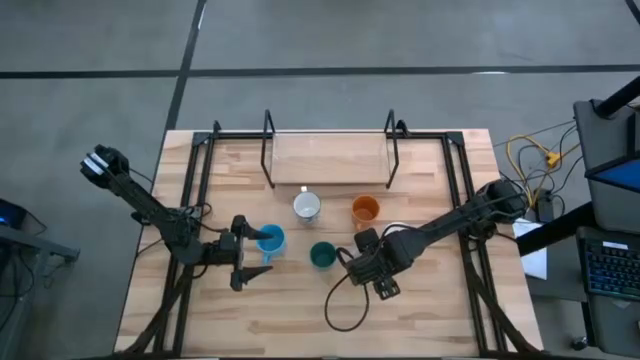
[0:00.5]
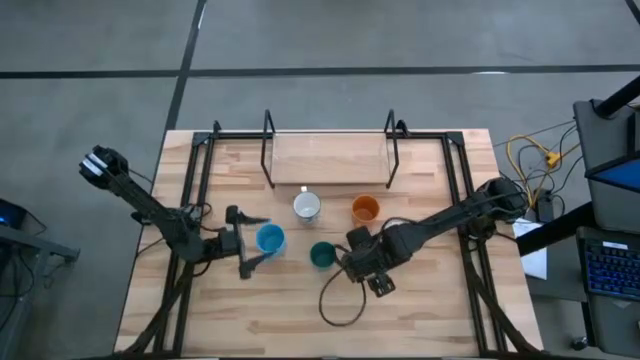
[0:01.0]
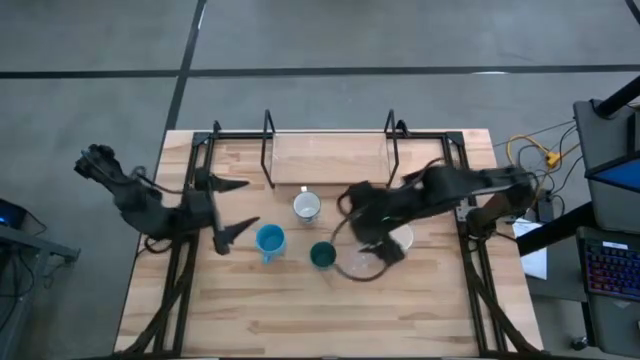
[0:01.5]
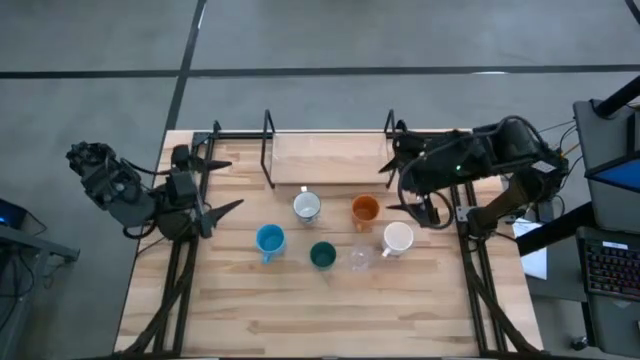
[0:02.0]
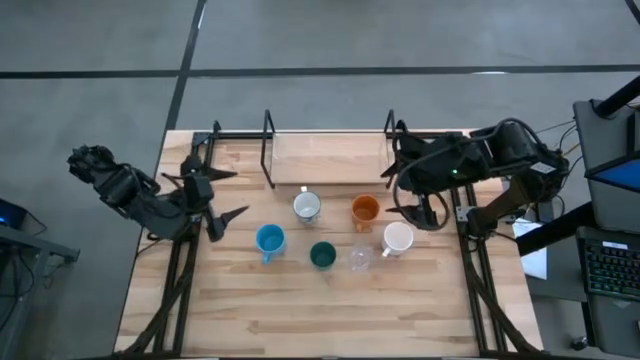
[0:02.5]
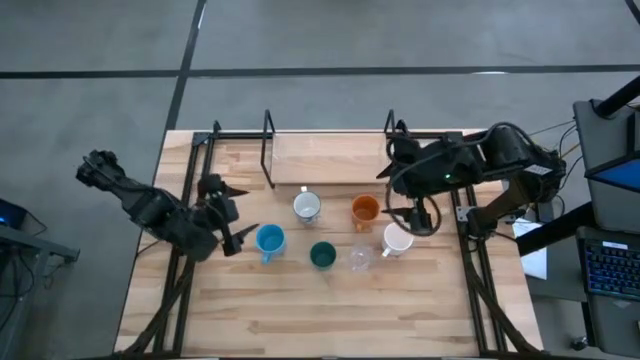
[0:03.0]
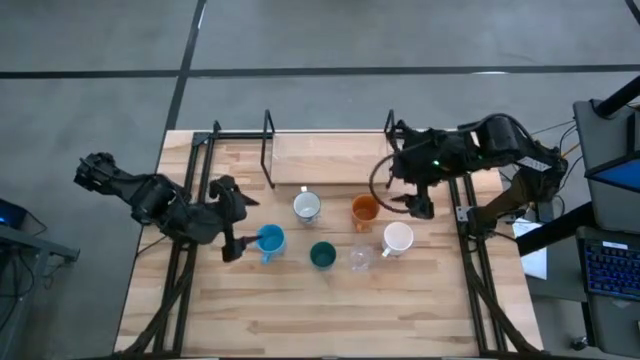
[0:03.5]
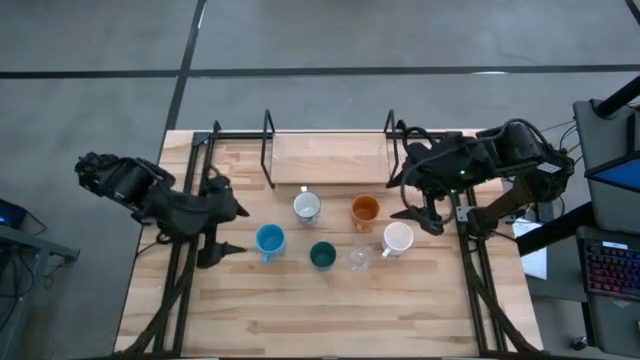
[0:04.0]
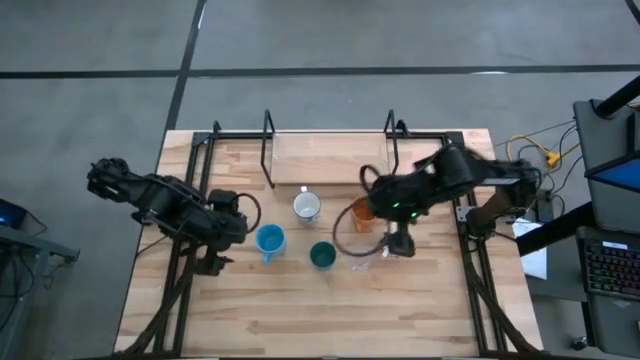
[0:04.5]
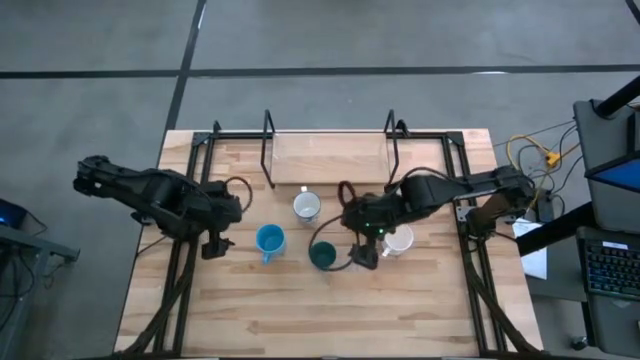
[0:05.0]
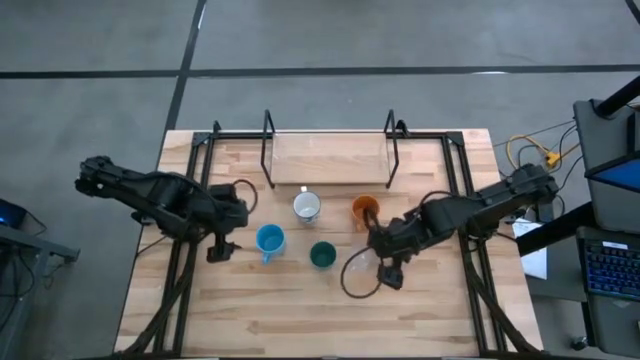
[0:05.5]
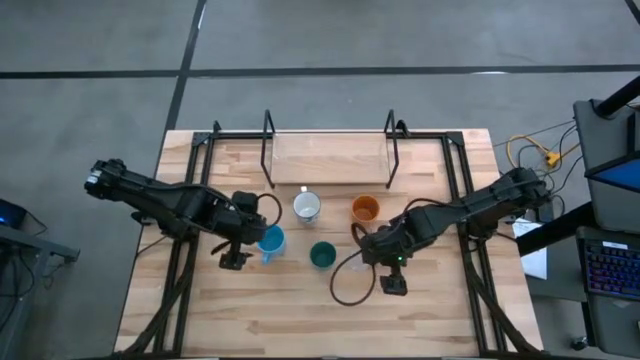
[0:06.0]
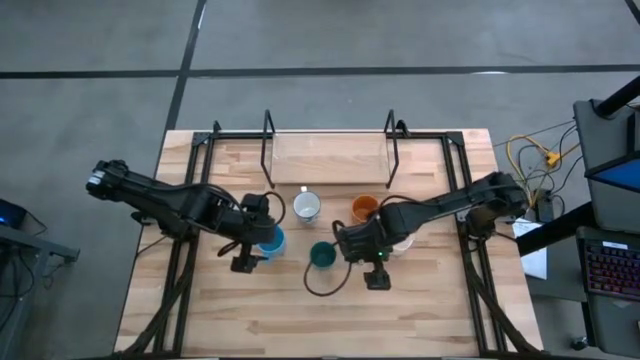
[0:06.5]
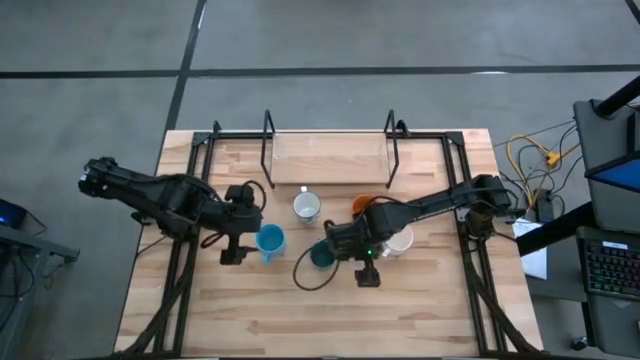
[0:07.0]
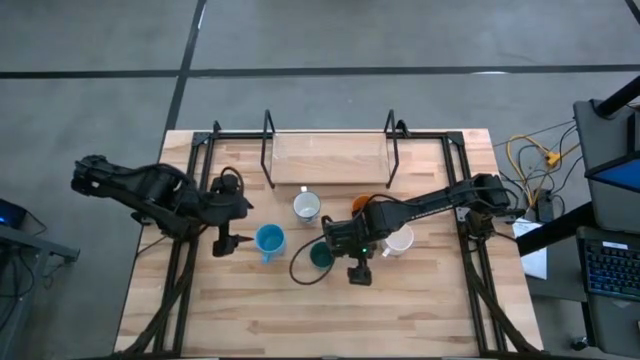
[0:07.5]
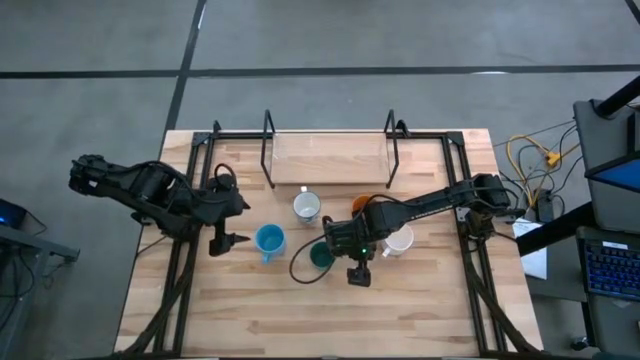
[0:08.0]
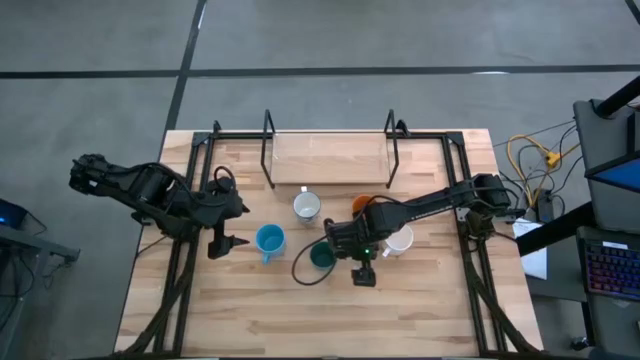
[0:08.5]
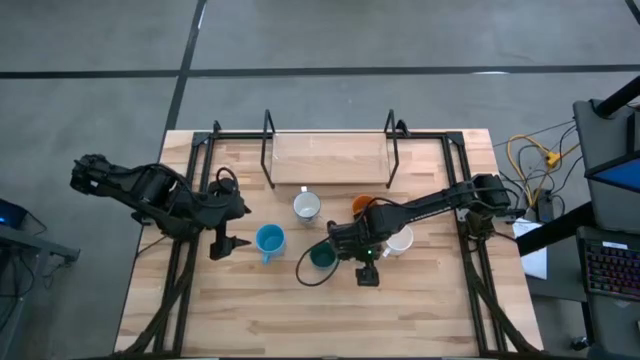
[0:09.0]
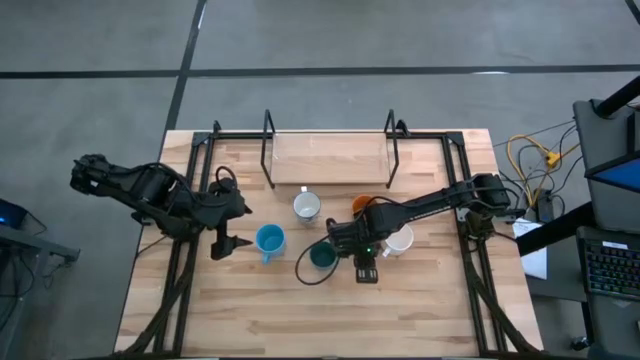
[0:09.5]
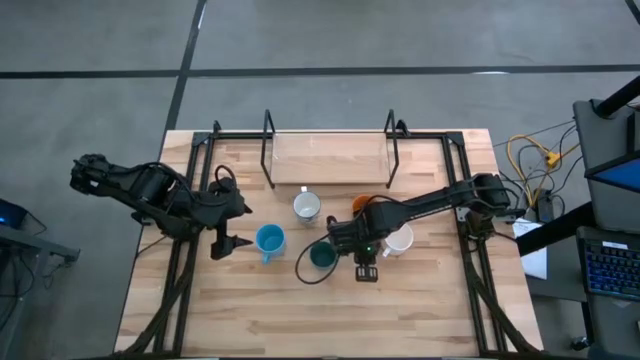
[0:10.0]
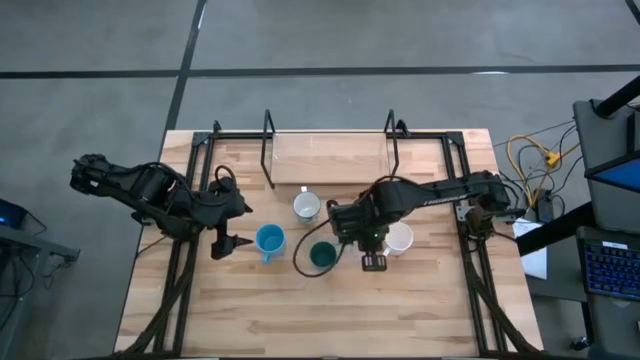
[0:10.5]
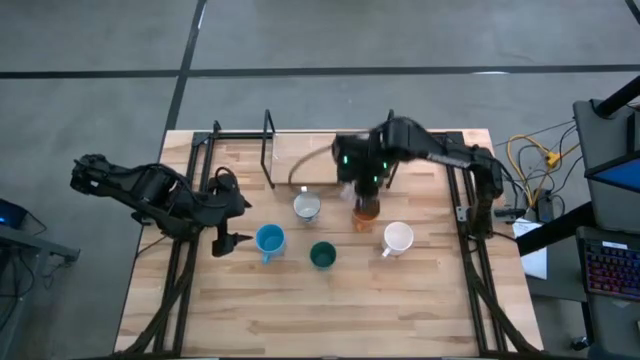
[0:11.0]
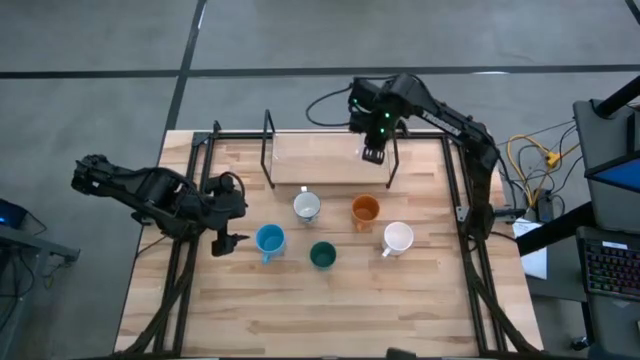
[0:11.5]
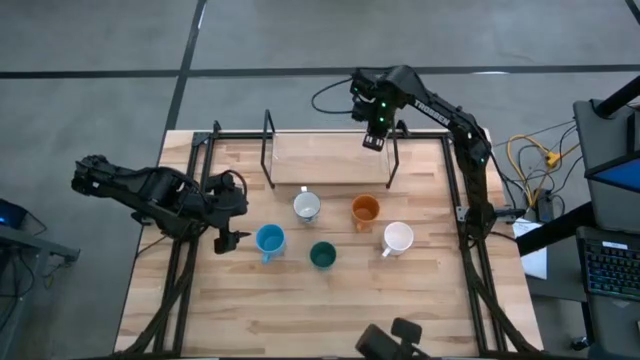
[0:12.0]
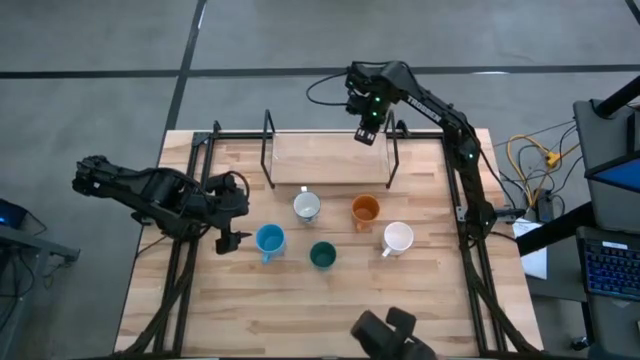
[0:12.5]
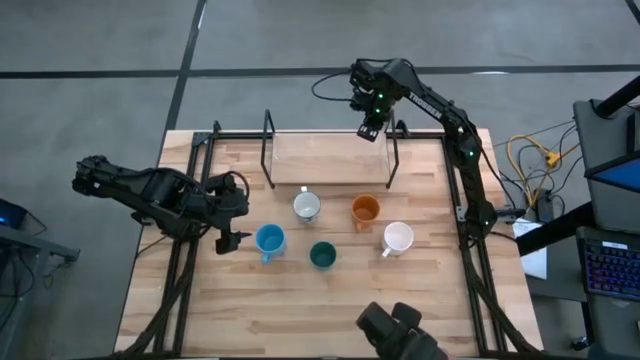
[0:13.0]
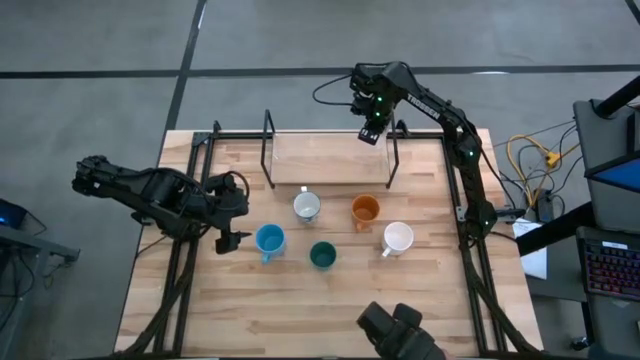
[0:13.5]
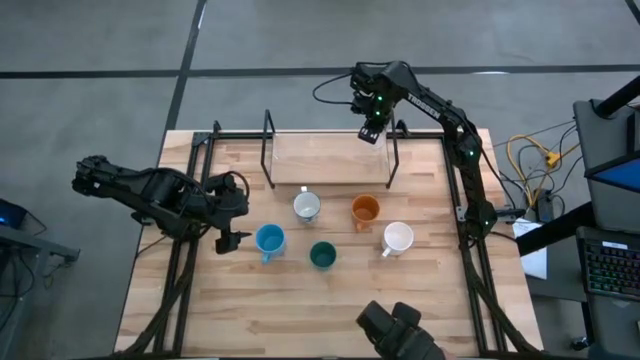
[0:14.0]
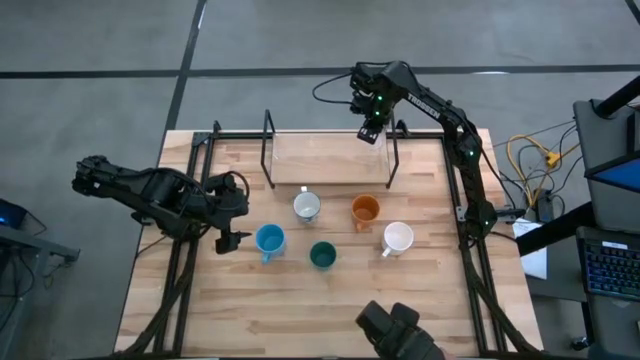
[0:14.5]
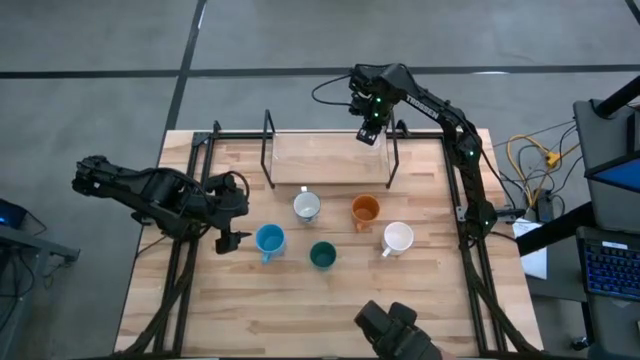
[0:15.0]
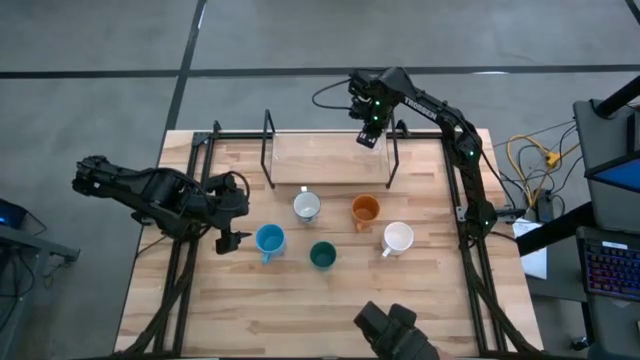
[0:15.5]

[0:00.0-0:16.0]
Task: Stack small to large cups/mugs on shelf
Put the transparent mug on the shelf
